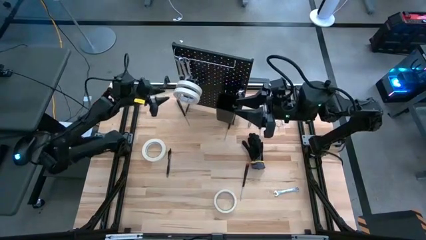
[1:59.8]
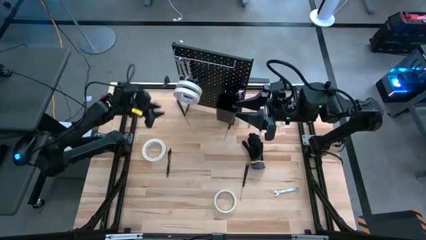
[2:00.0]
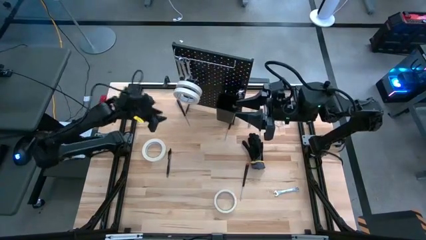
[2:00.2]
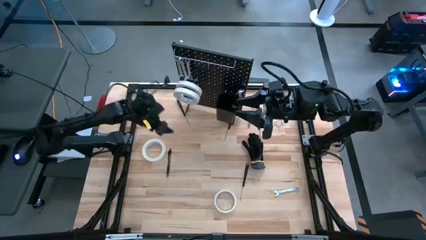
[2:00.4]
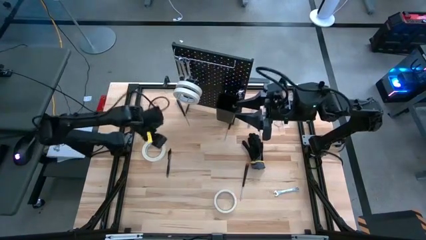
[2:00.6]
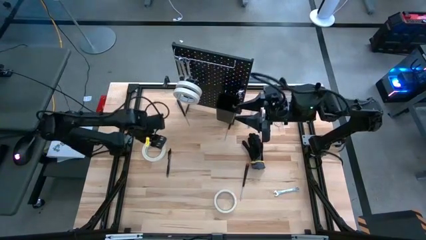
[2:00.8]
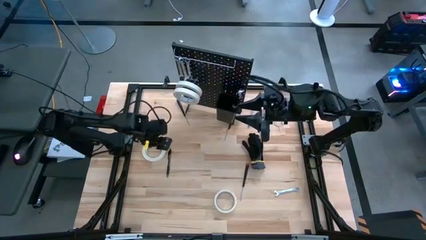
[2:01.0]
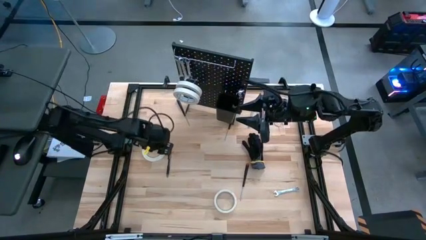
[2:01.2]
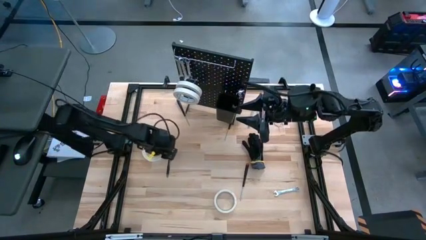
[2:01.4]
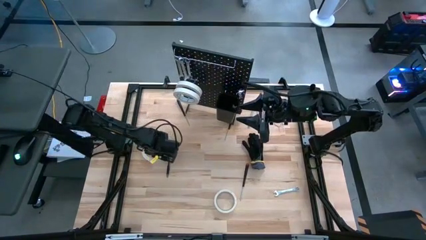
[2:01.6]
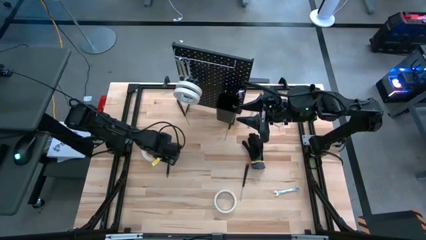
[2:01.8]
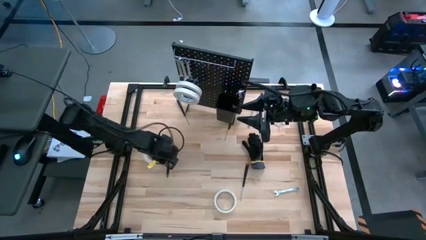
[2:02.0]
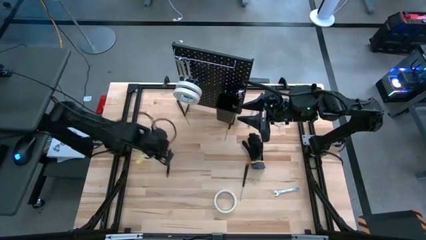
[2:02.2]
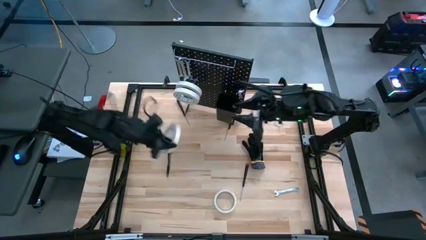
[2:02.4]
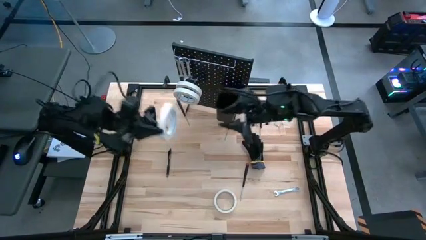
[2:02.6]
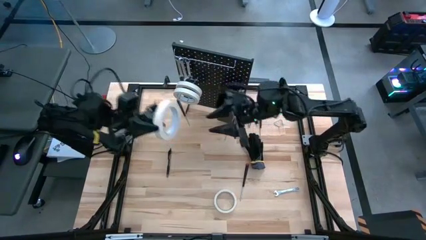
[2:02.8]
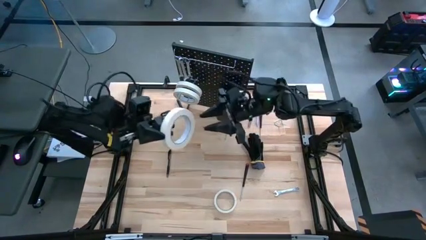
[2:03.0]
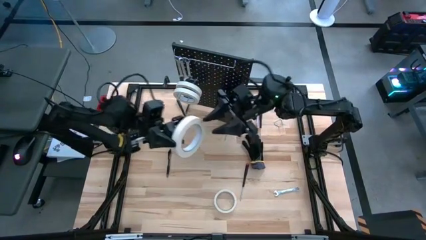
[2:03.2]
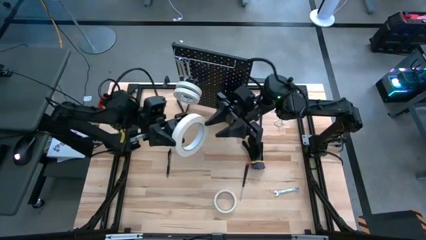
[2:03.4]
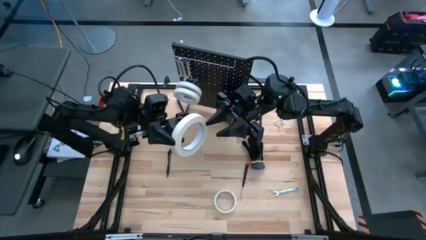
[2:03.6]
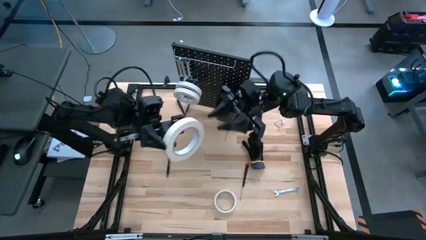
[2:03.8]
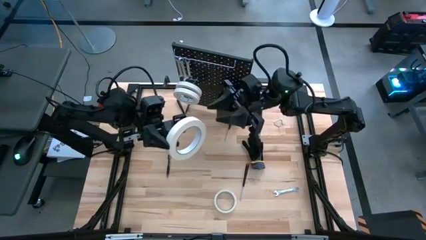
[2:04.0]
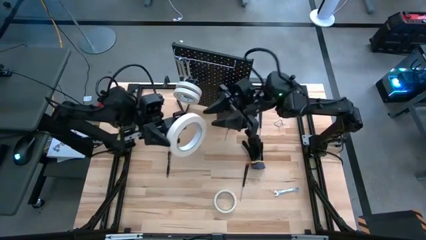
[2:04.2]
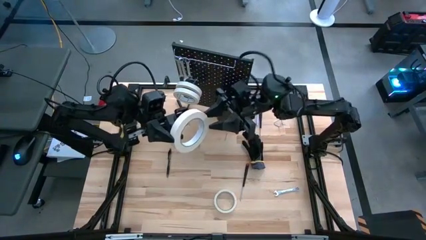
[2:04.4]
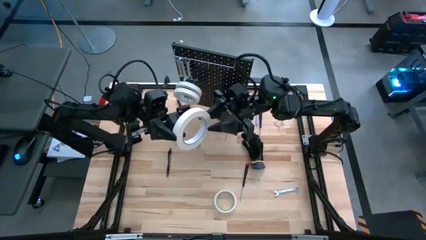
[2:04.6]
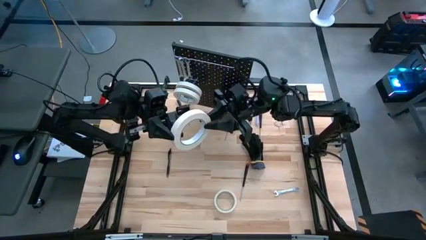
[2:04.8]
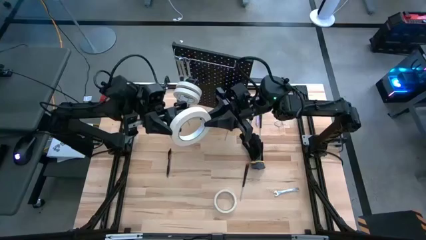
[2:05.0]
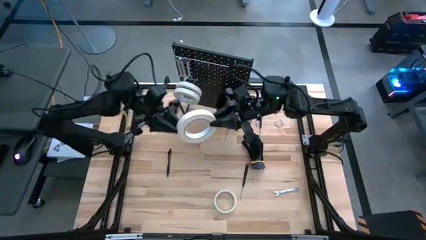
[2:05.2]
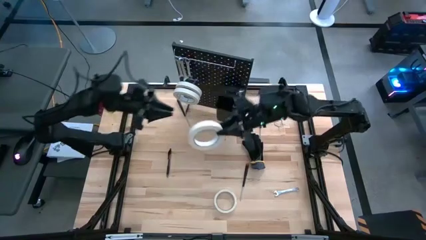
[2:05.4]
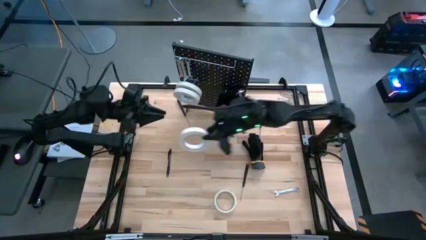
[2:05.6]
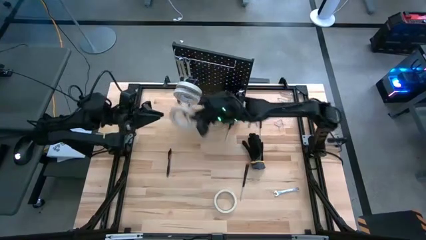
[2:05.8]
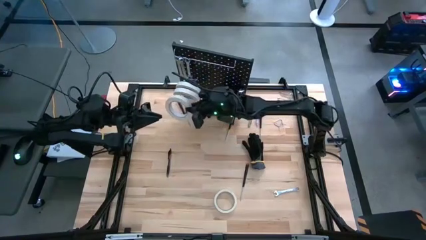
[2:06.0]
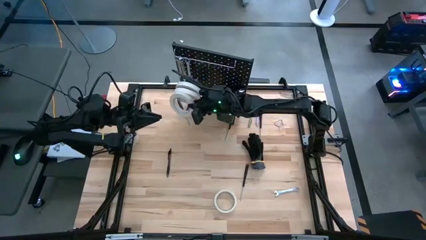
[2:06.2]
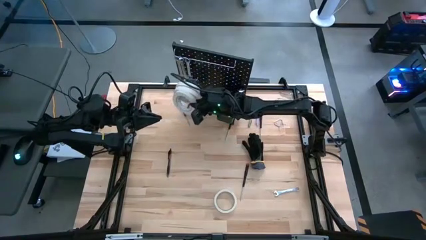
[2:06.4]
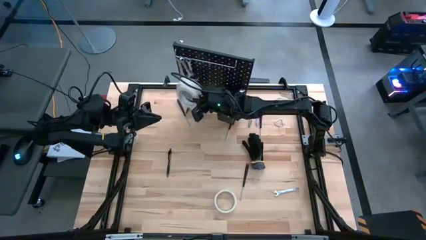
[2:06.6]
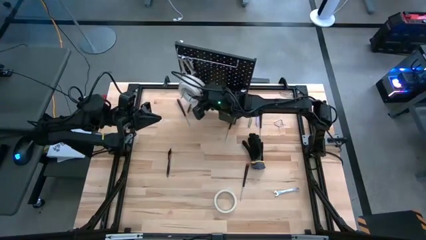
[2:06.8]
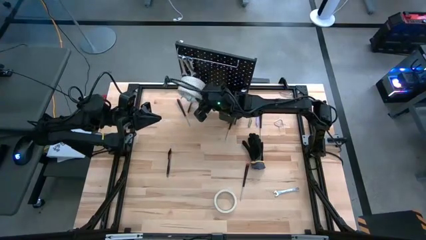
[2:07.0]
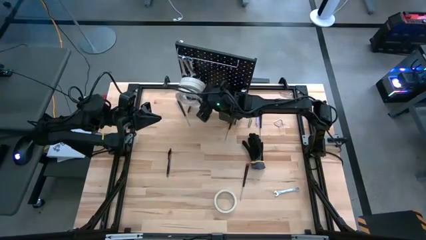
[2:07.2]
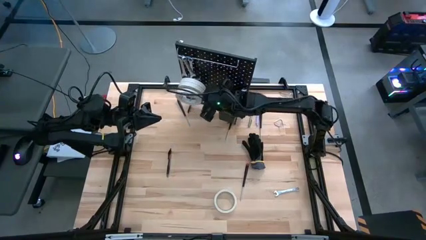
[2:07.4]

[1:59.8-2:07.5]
Task: Hang tools onto peg board
Hang the masking tape onto the pegboard

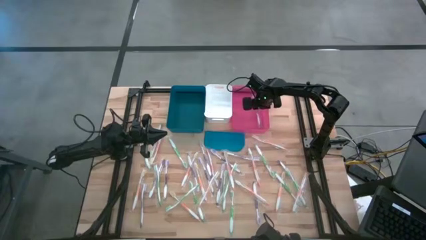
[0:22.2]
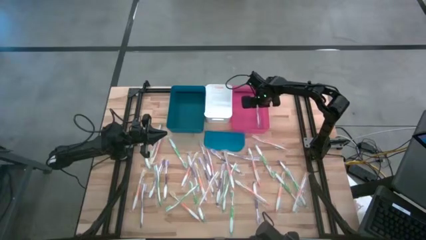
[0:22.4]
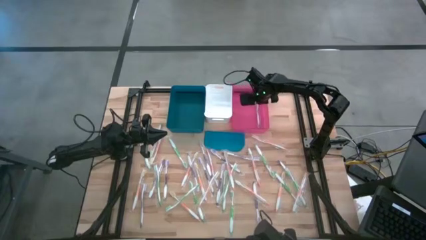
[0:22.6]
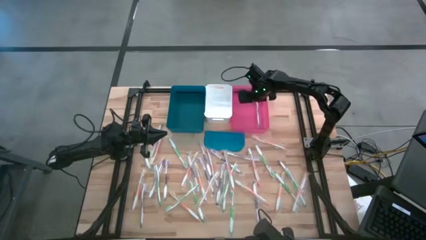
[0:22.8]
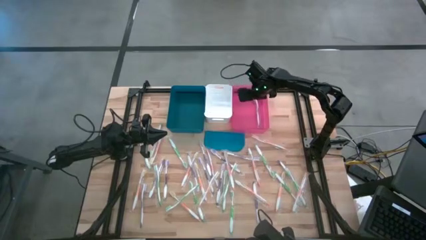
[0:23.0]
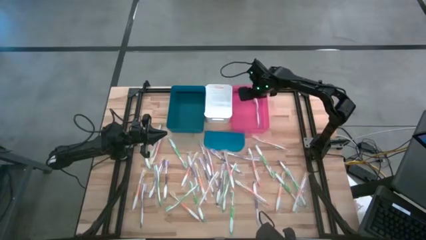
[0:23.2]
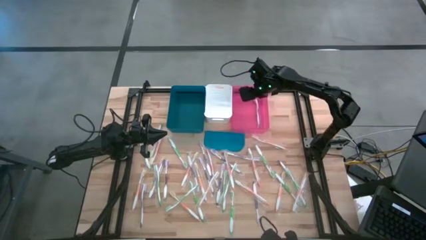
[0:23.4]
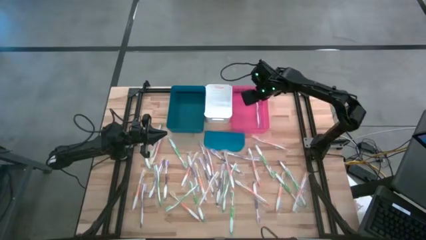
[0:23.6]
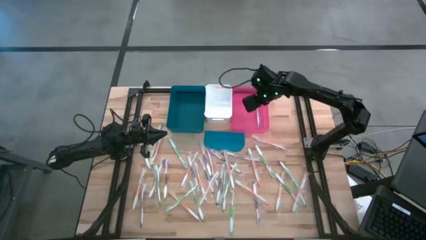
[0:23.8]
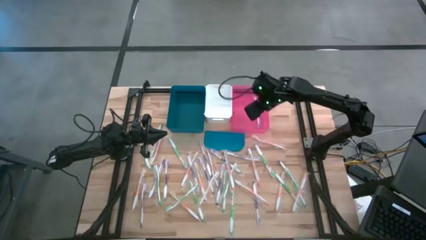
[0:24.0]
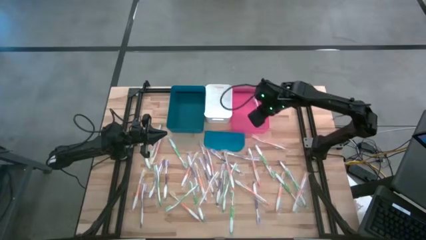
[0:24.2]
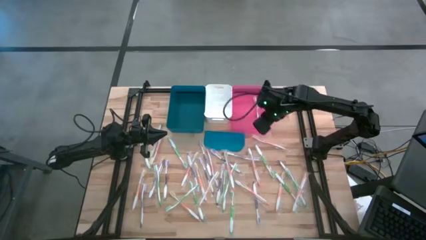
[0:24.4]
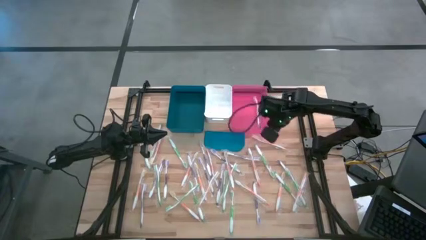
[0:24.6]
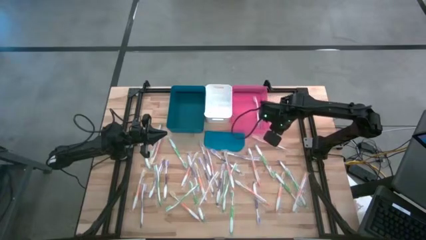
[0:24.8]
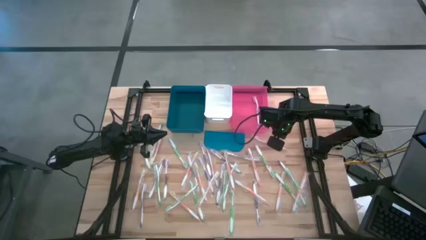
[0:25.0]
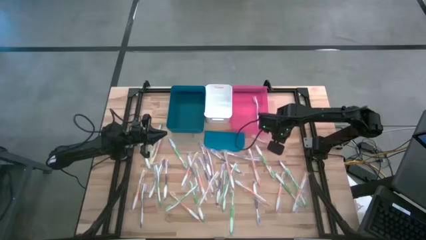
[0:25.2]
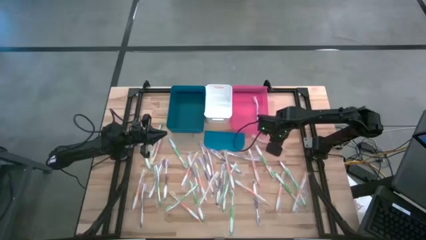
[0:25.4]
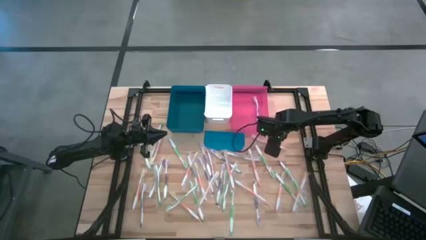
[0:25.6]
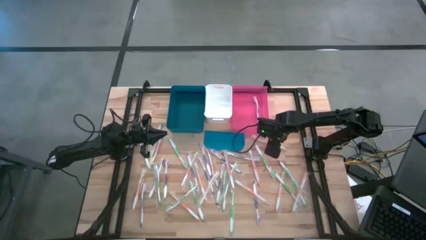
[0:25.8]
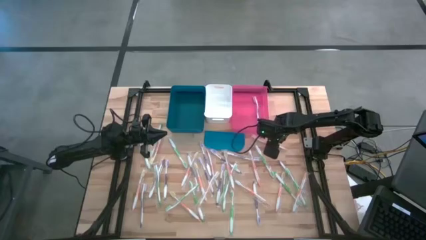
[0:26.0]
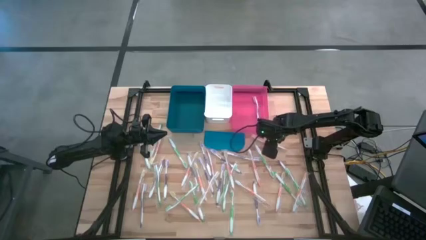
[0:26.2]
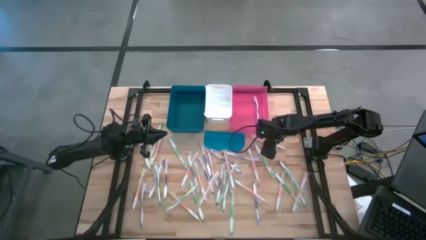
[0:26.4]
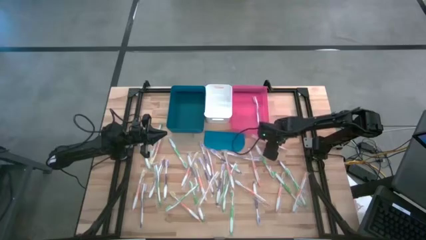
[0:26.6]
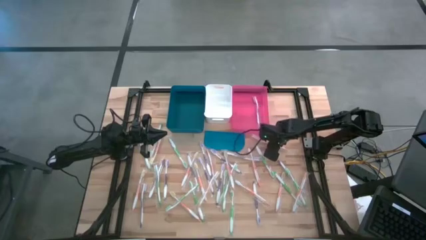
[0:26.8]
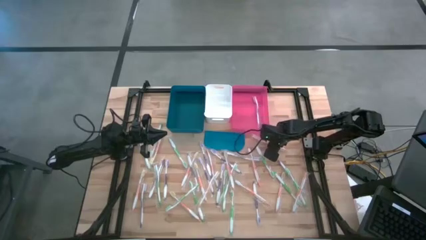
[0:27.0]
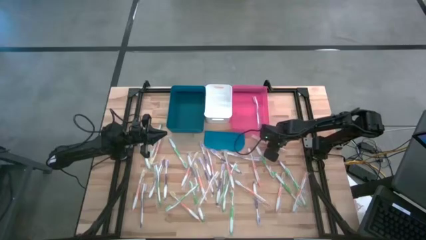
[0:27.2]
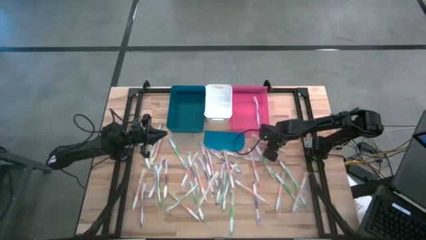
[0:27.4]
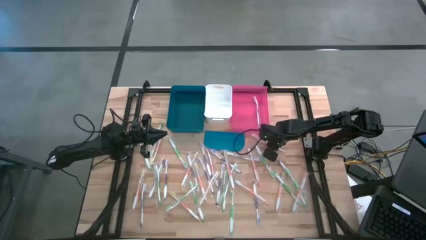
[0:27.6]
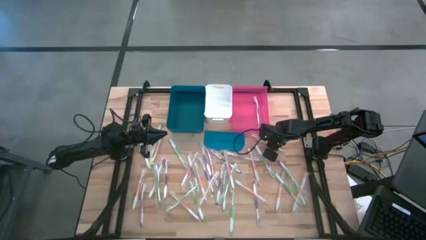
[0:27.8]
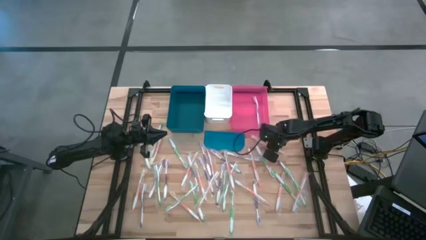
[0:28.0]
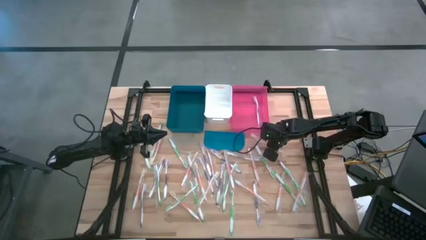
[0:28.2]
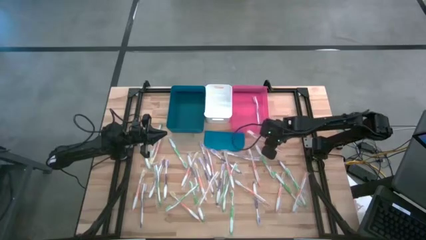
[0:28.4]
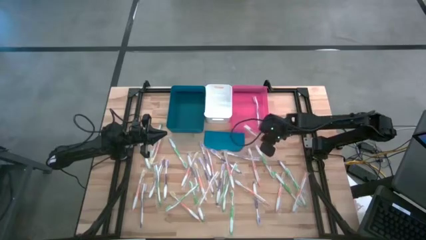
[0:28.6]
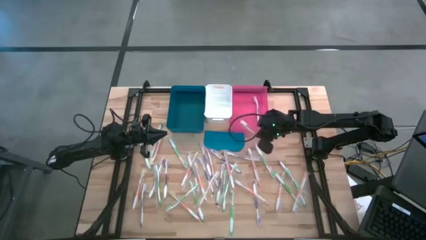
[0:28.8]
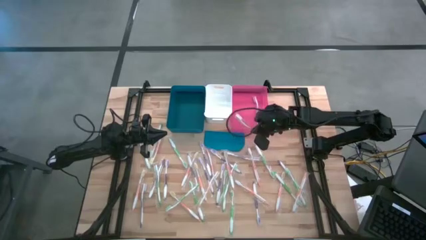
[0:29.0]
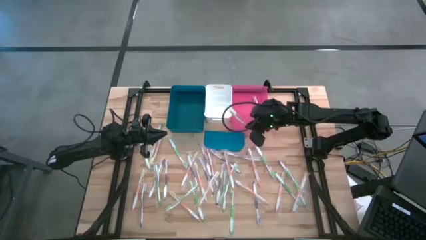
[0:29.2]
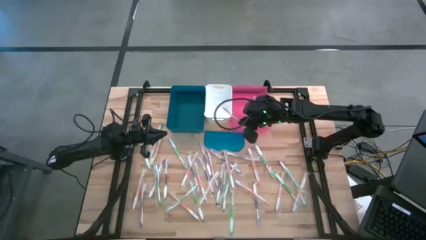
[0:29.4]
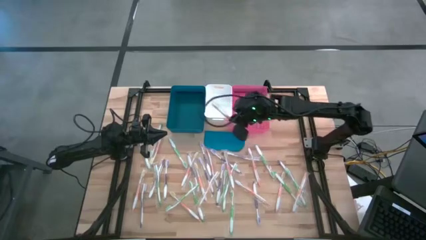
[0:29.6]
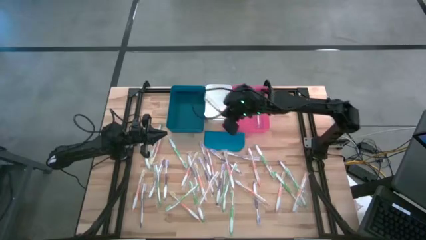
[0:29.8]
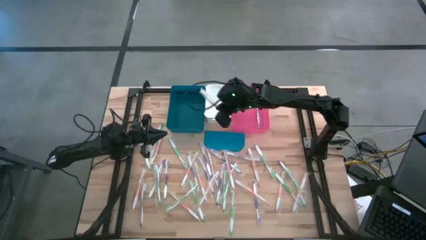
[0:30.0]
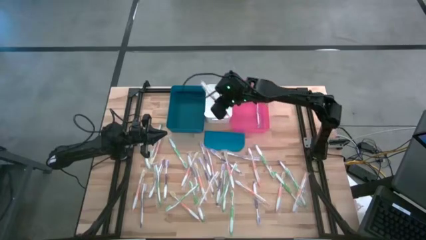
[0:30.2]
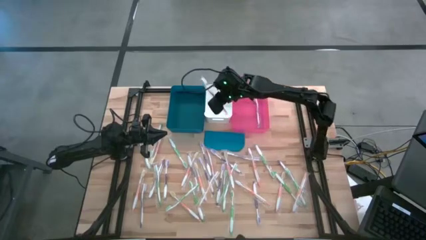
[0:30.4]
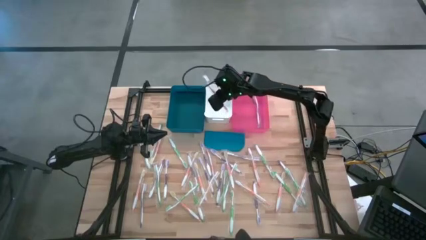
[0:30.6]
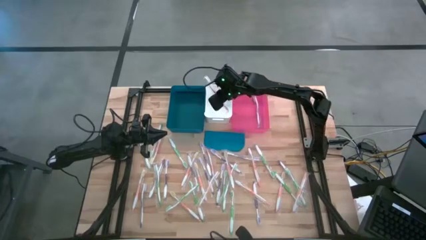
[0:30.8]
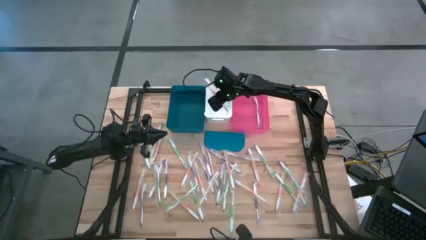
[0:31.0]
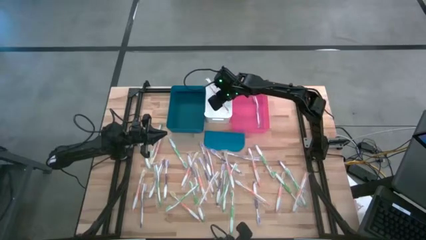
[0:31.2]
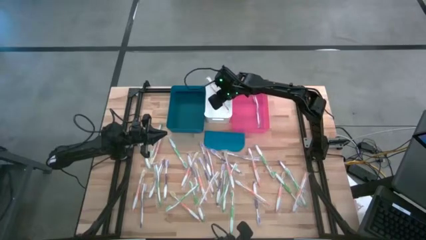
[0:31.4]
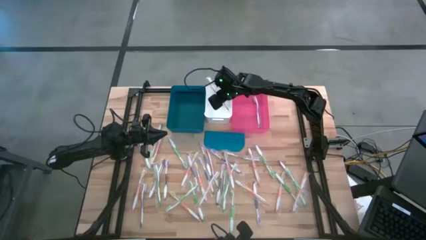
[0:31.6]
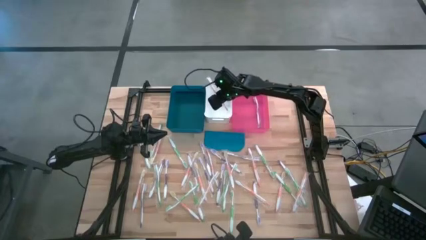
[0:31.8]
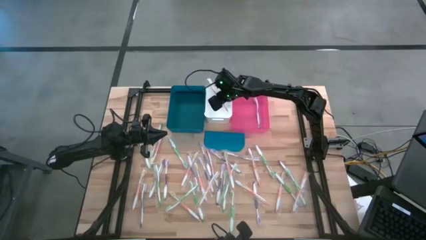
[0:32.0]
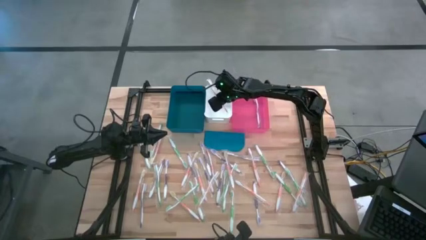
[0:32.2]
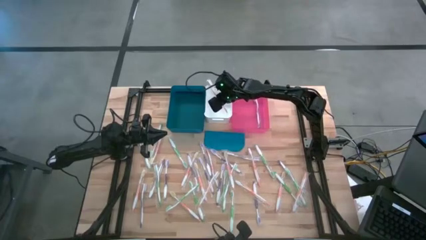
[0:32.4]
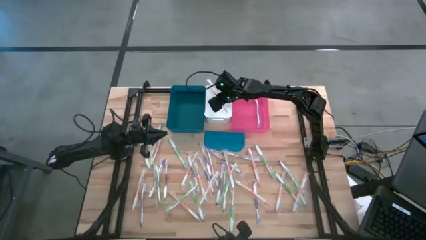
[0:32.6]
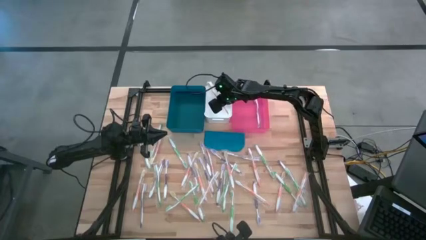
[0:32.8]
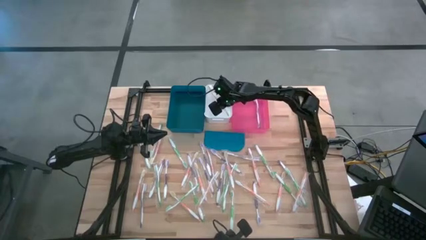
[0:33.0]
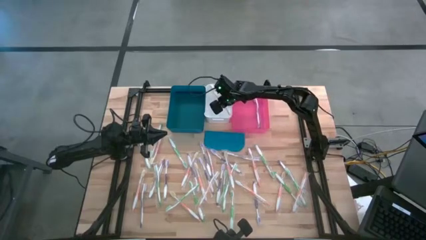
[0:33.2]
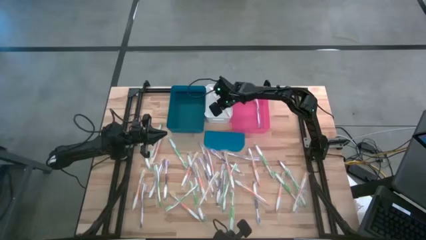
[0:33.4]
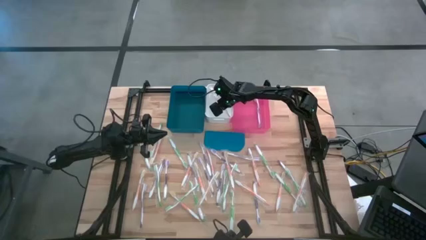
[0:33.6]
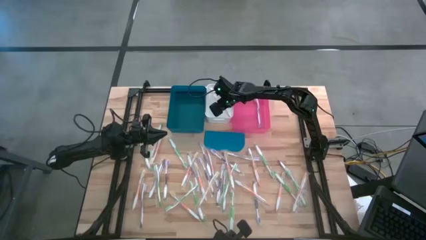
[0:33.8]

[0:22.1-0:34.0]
Task: Pick & Place Toothbrushes
Put the orange toothbrush into the white bin
